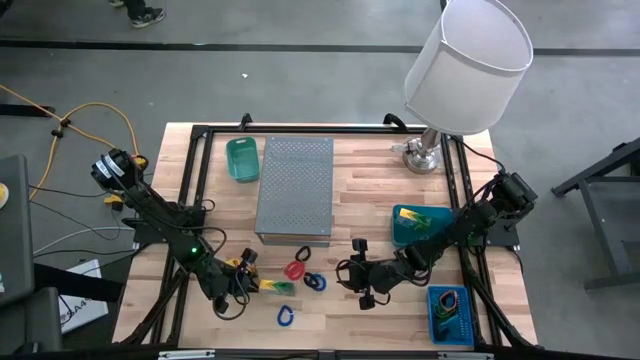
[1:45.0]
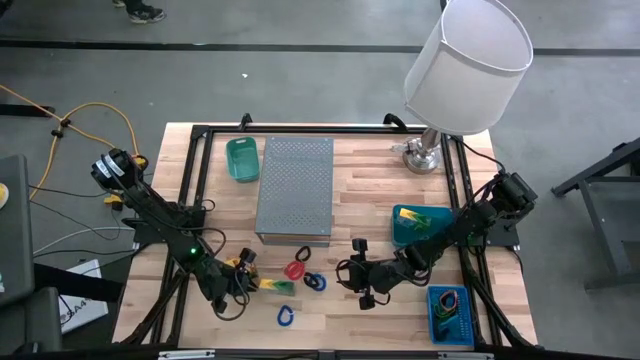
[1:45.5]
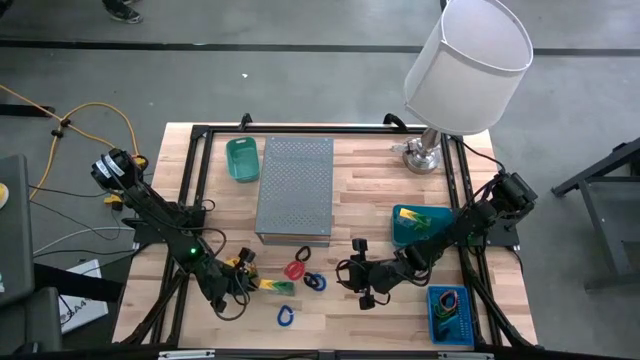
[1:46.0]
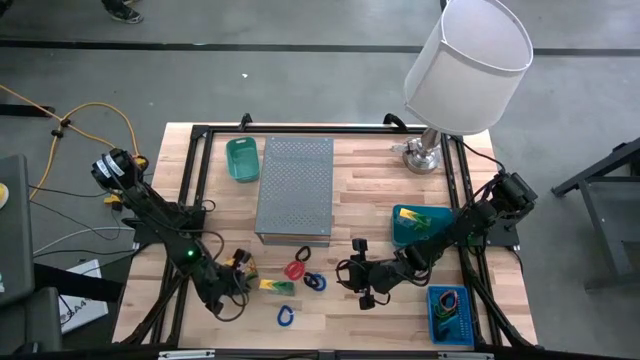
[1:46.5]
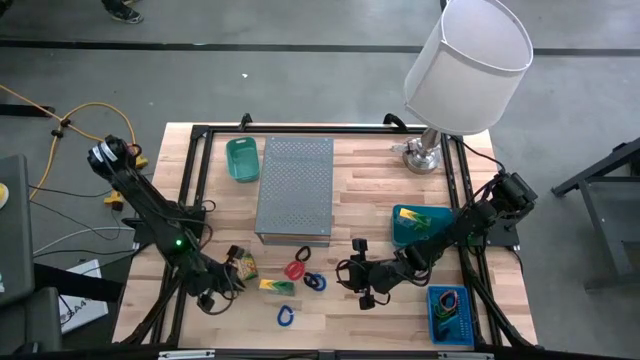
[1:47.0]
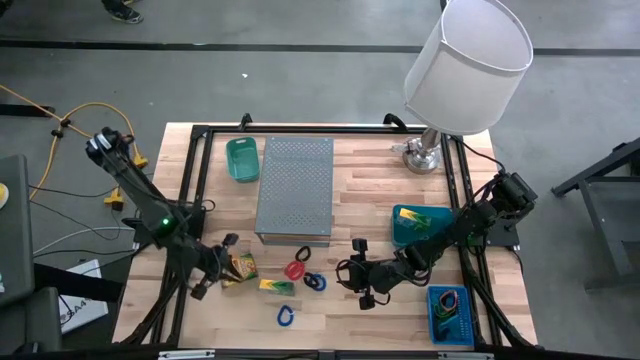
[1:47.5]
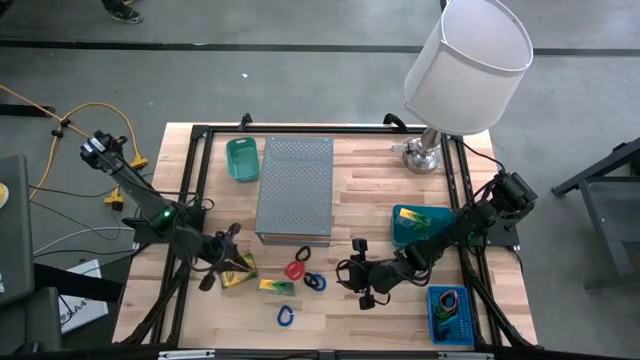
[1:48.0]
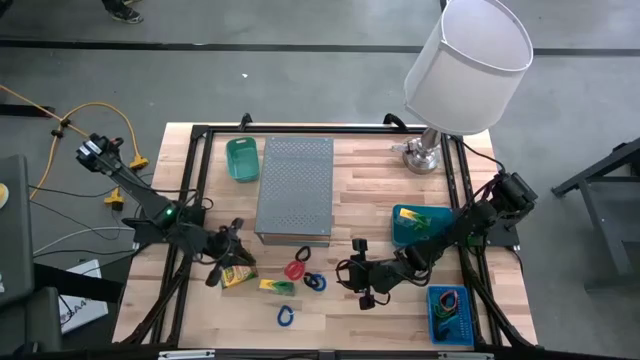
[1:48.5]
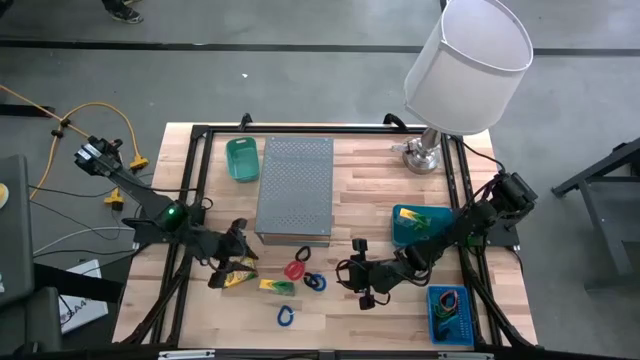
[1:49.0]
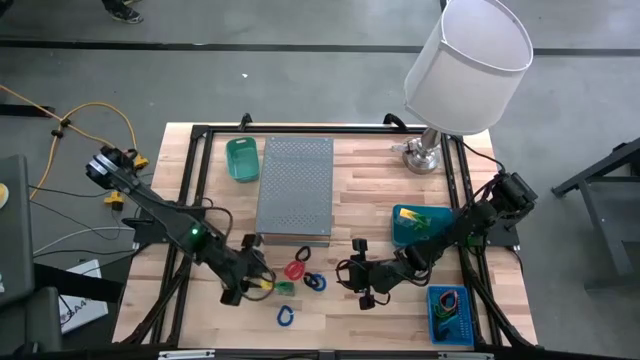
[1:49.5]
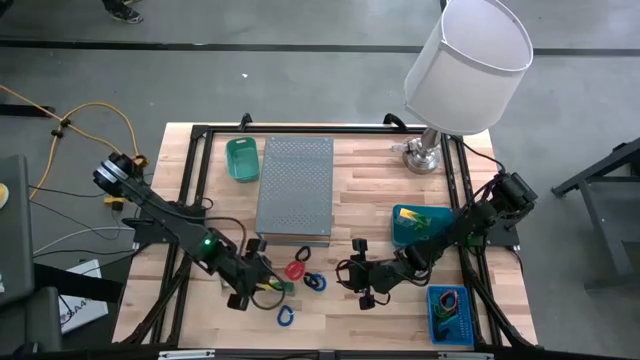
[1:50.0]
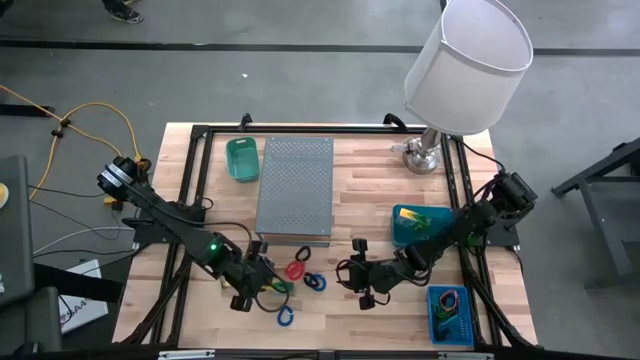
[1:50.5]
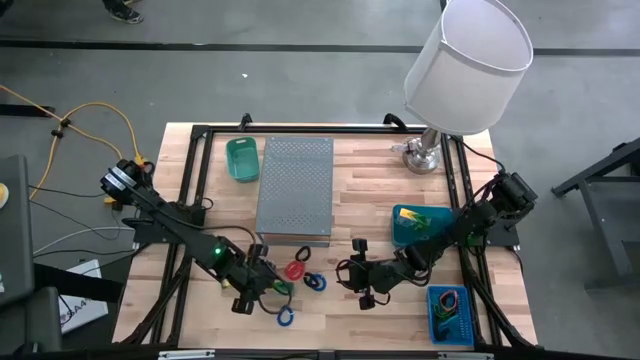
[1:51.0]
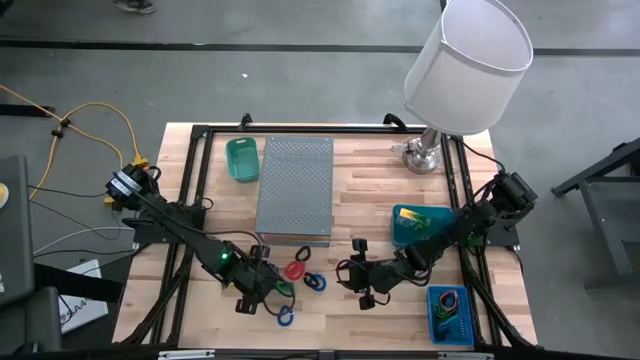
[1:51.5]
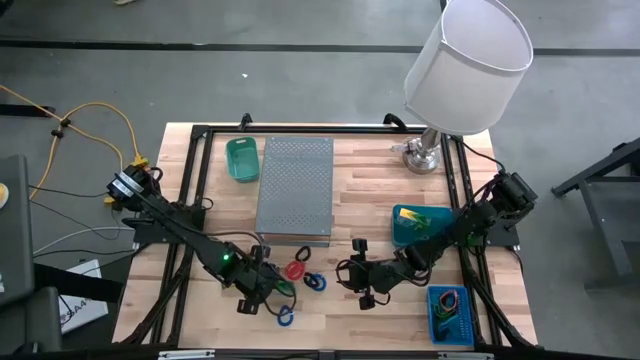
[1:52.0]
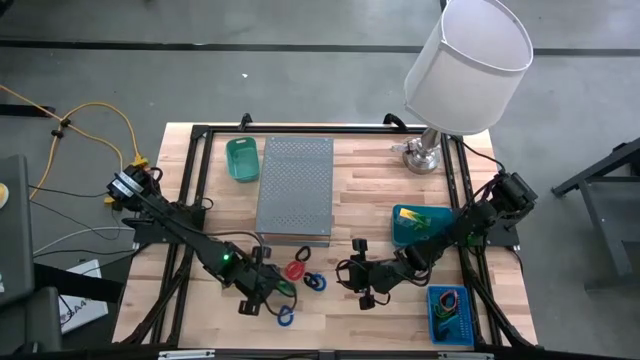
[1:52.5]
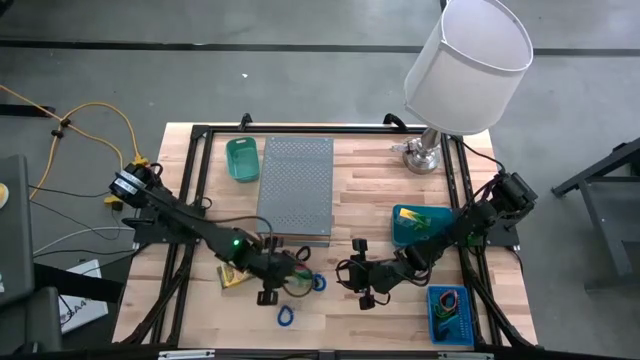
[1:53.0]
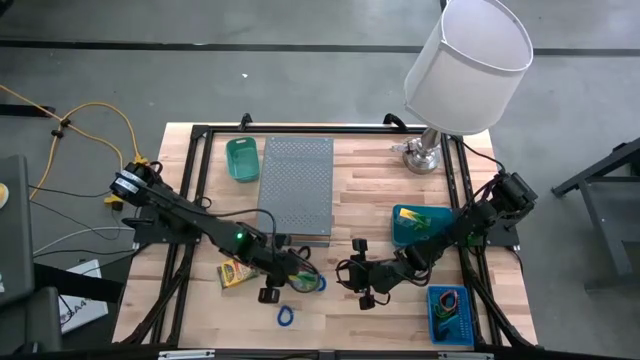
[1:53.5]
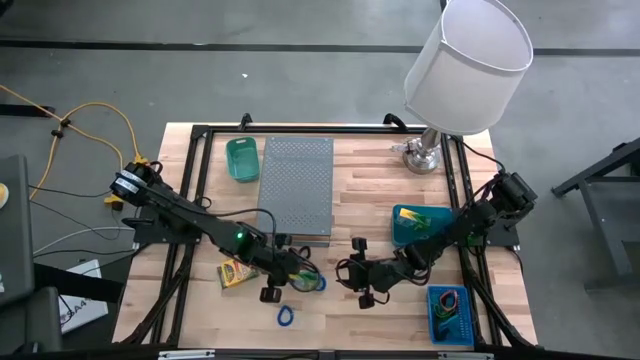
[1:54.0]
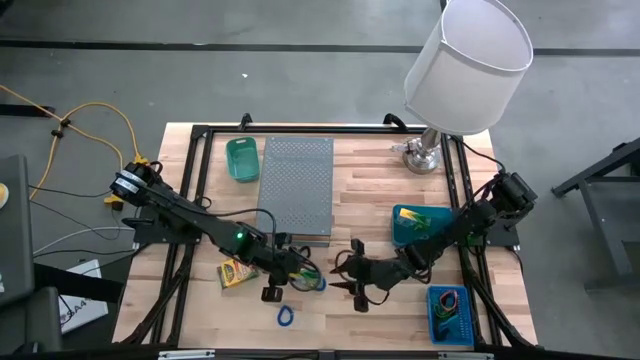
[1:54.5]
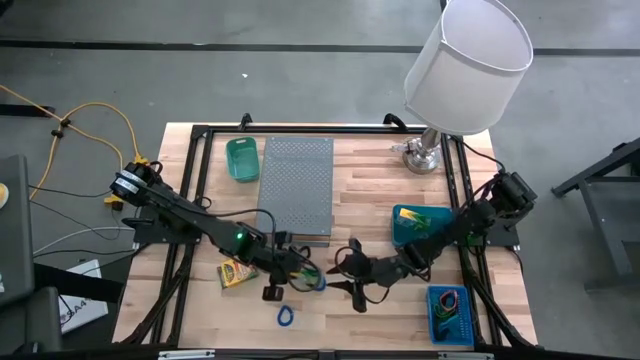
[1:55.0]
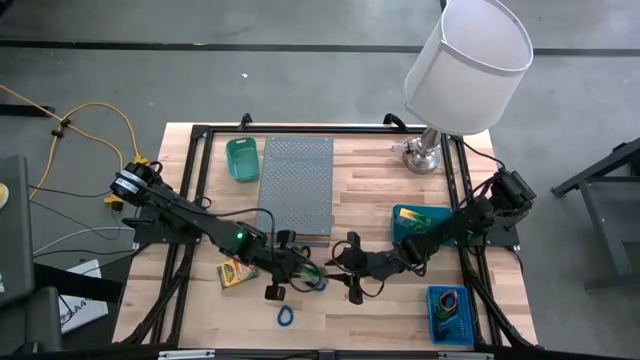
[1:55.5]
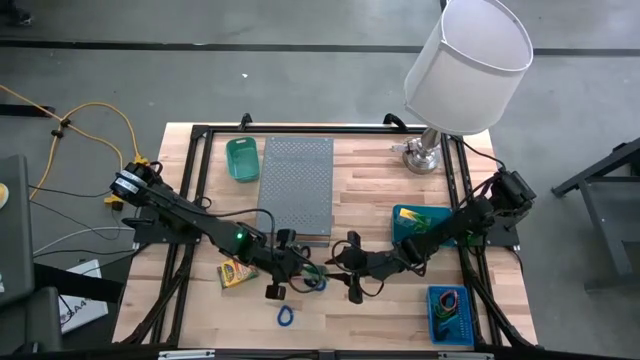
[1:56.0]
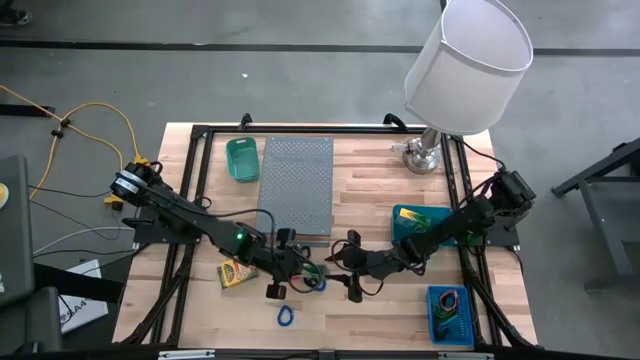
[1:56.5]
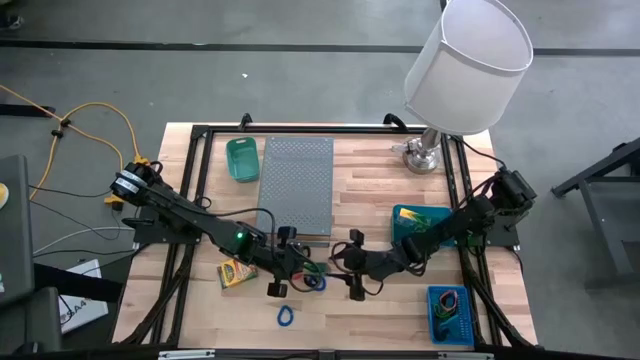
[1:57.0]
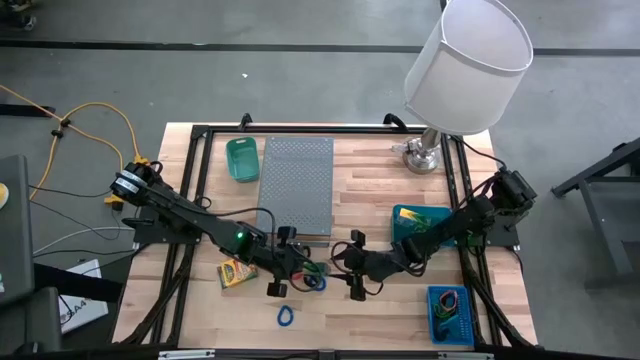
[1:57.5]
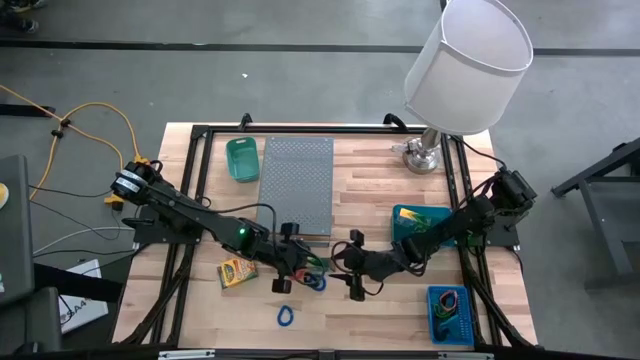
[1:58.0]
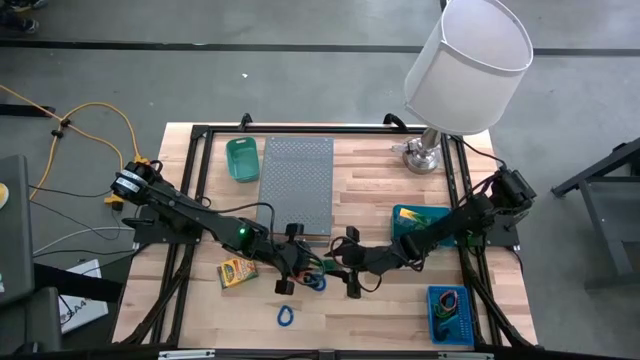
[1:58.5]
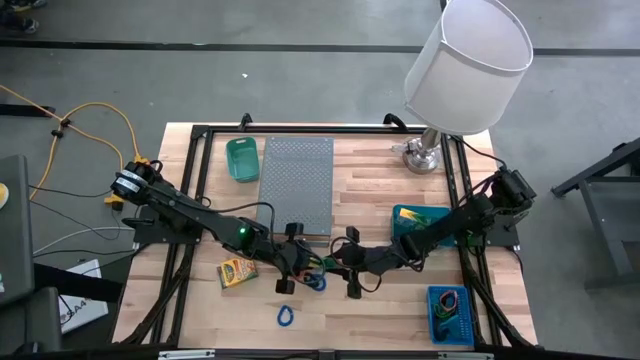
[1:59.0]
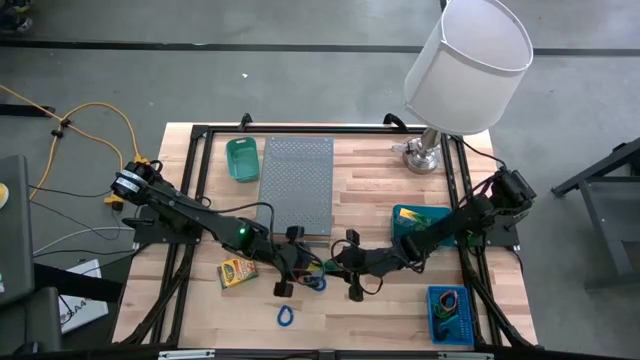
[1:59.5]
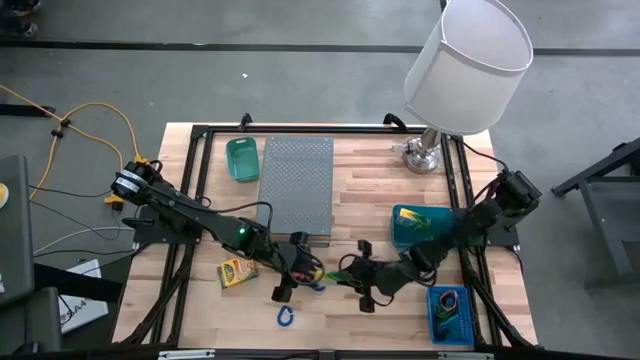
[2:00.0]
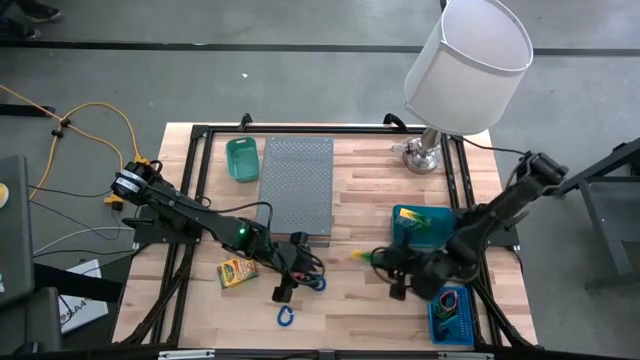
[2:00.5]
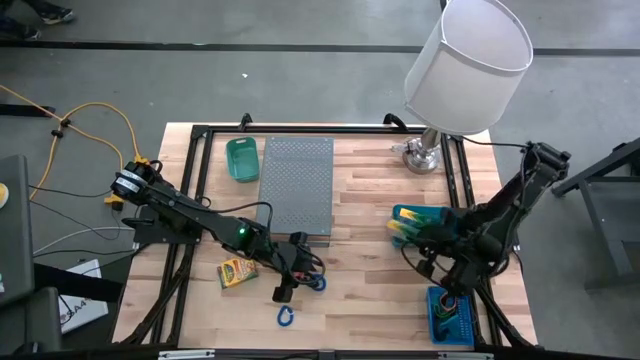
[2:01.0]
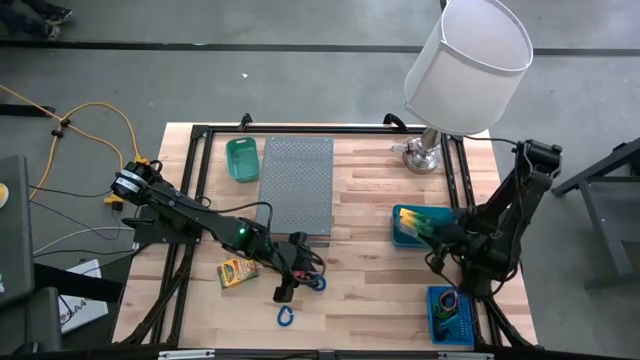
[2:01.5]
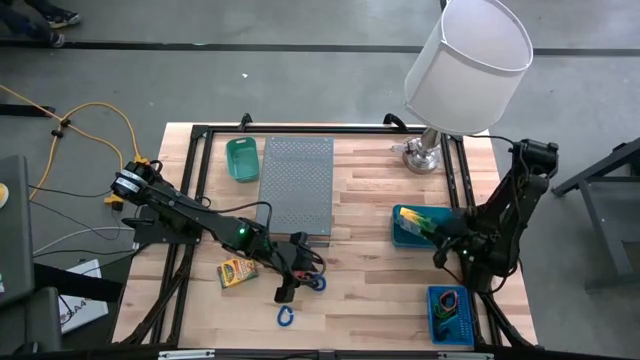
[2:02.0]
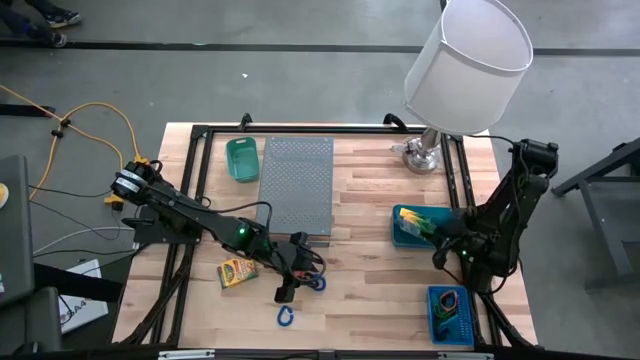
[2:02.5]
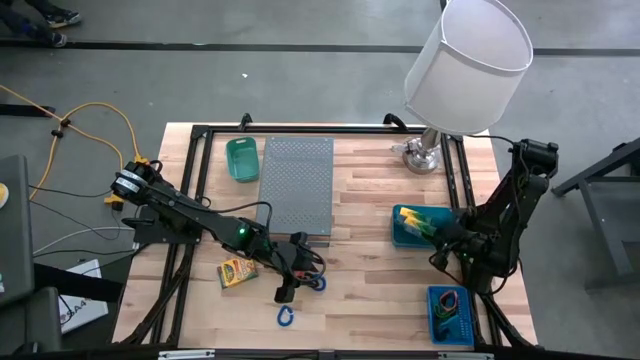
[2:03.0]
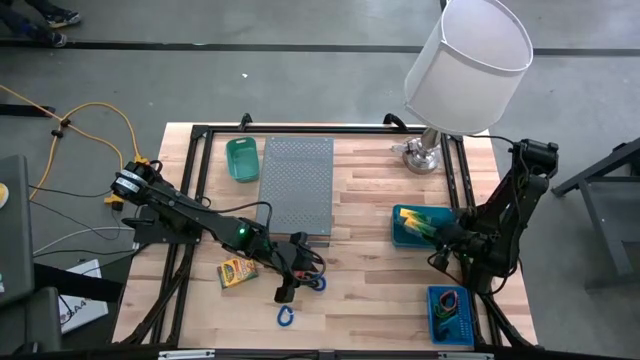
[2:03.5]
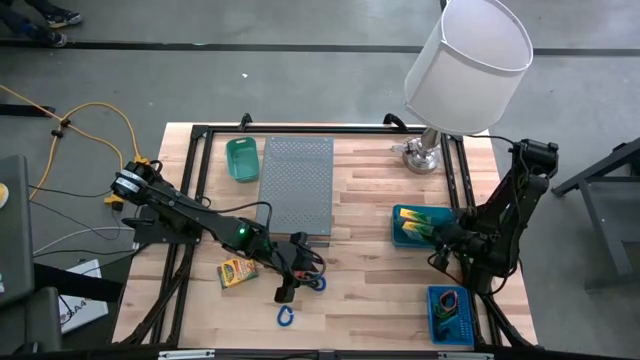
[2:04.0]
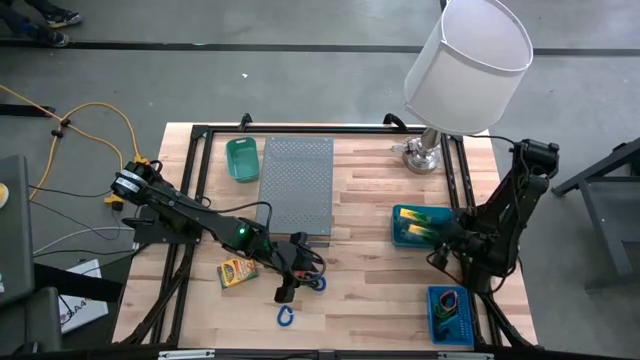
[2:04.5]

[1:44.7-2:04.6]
Task: Pick & Place Office Desk Supplies
Put the bottom crayon box into the blue bin

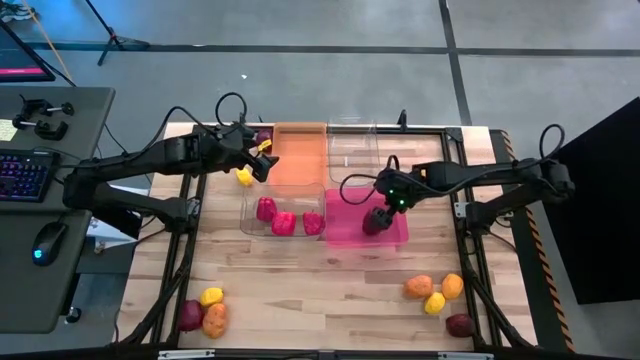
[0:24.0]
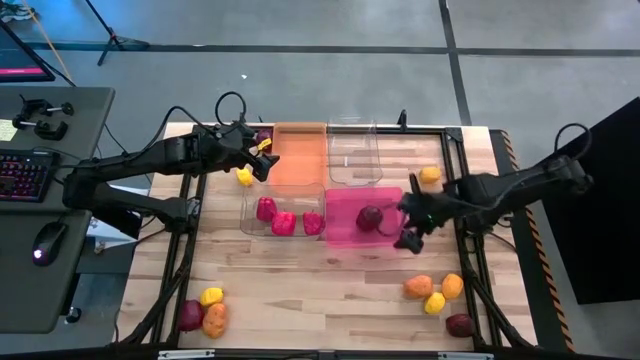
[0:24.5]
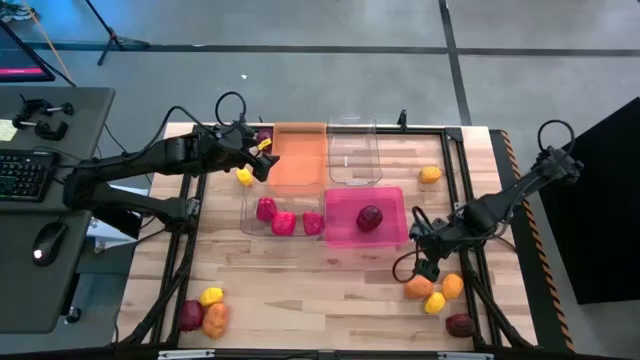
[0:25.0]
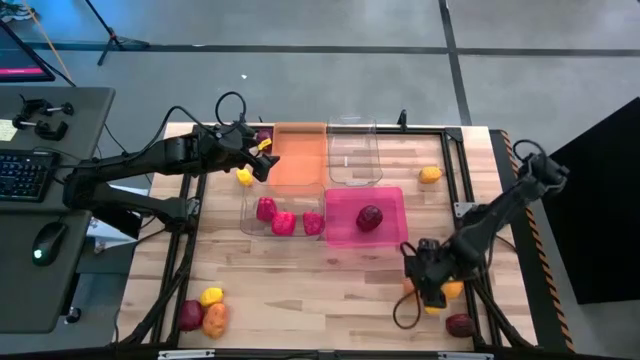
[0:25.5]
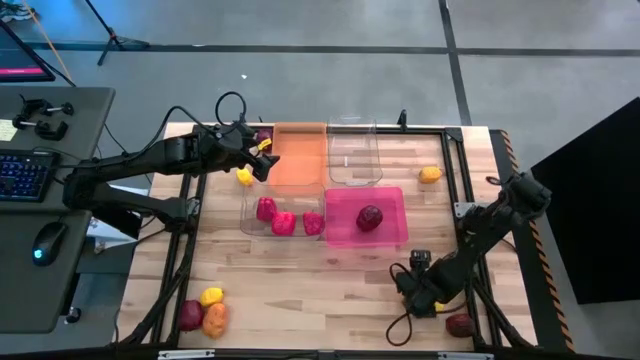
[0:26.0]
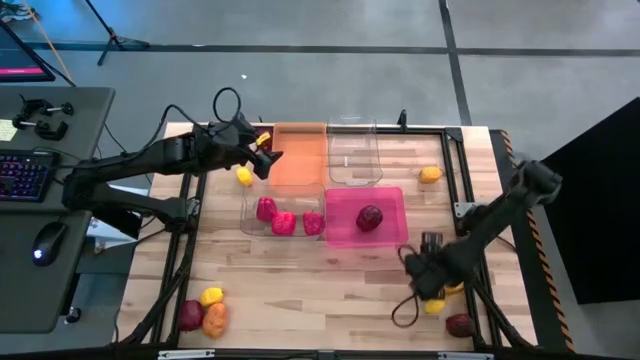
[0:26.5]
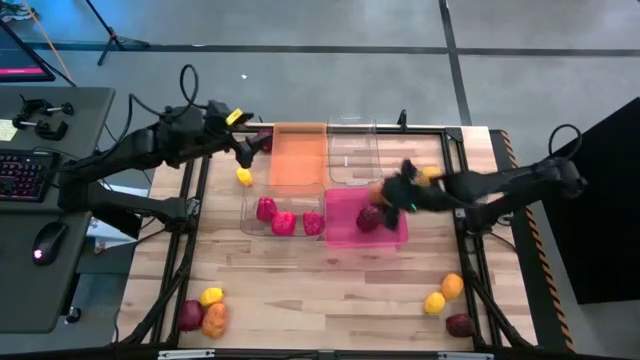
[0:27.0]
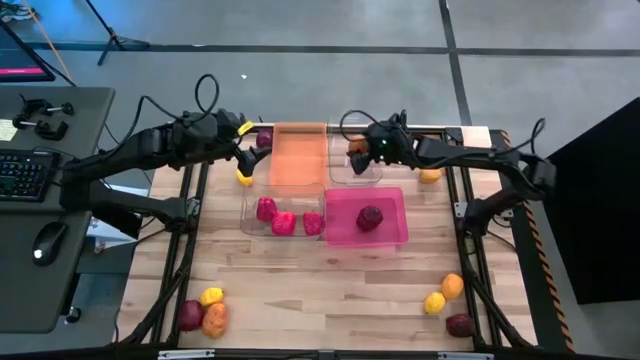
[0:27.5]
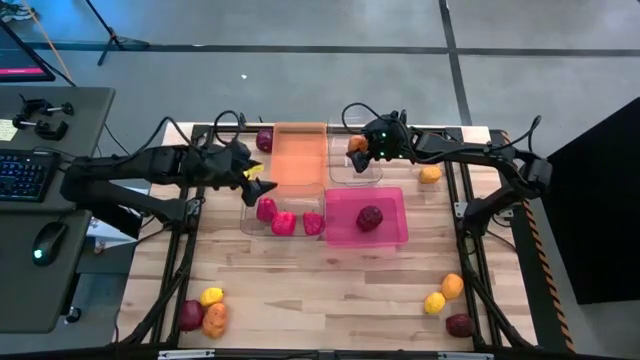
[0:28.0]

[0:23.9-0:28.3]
Task: Sort produce into baskets
Put the potato into the right transparent bin
